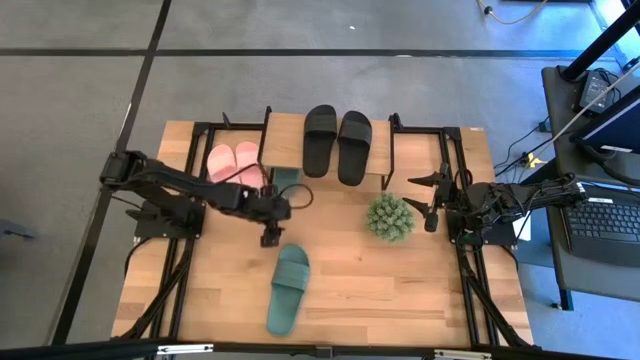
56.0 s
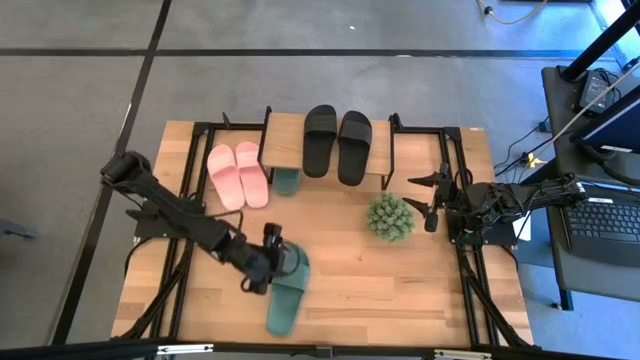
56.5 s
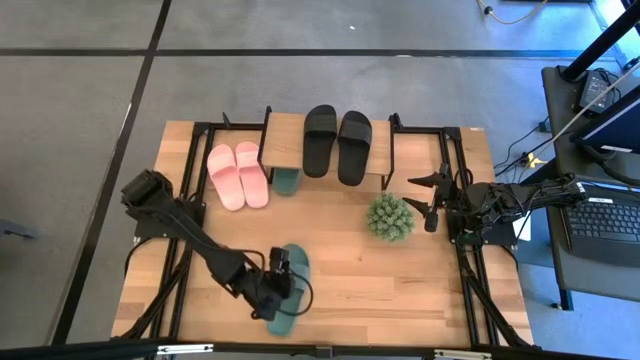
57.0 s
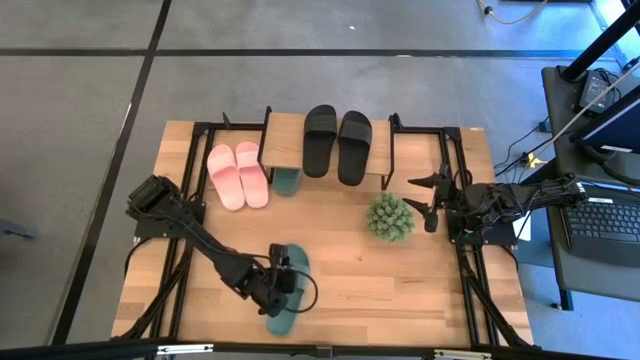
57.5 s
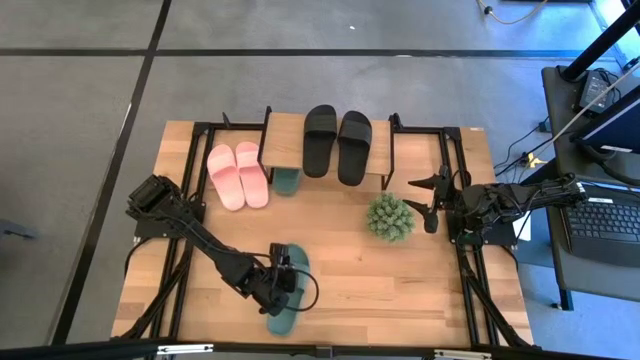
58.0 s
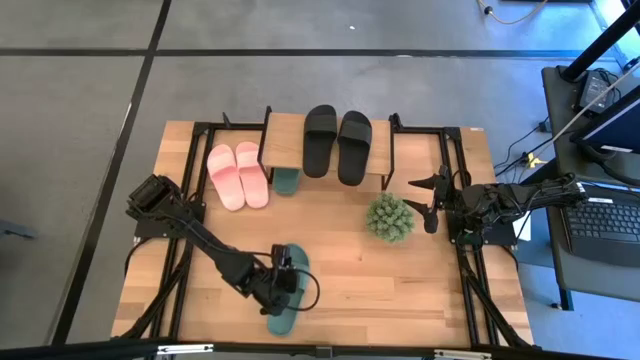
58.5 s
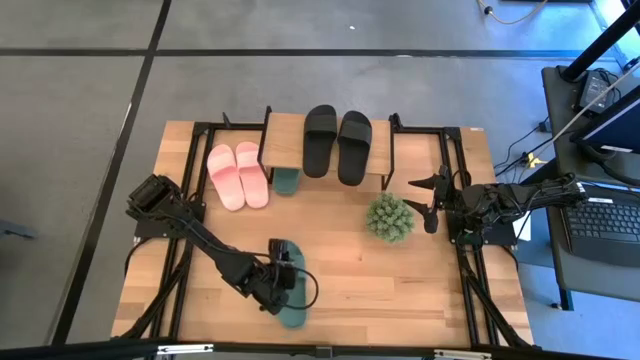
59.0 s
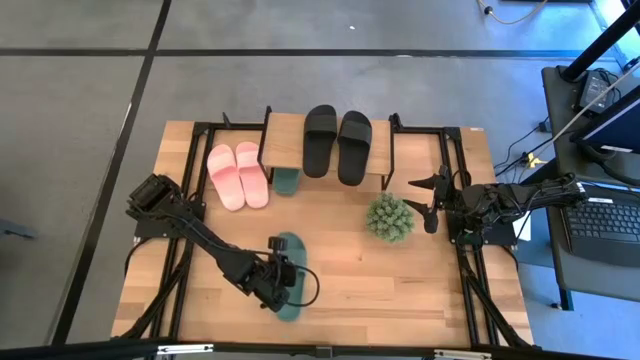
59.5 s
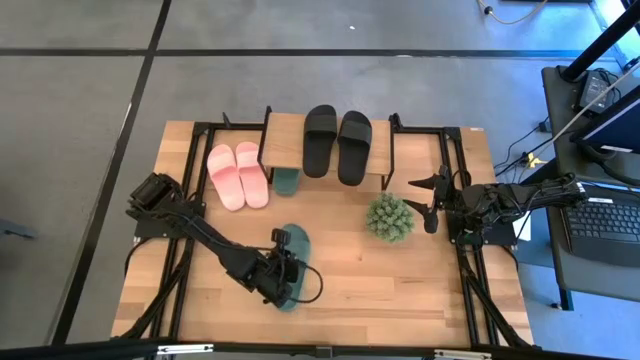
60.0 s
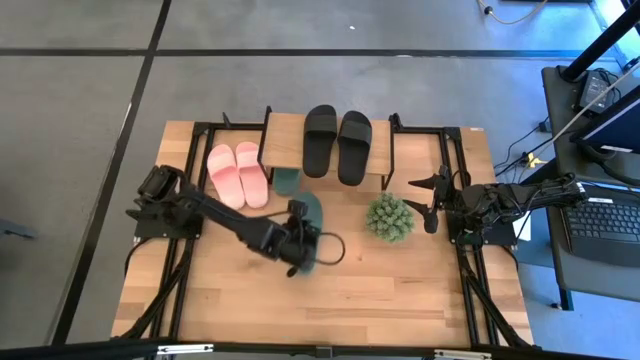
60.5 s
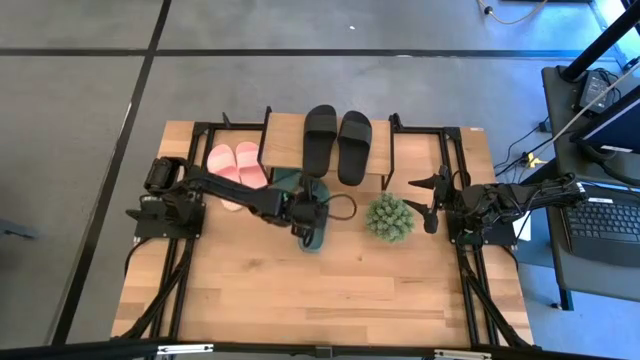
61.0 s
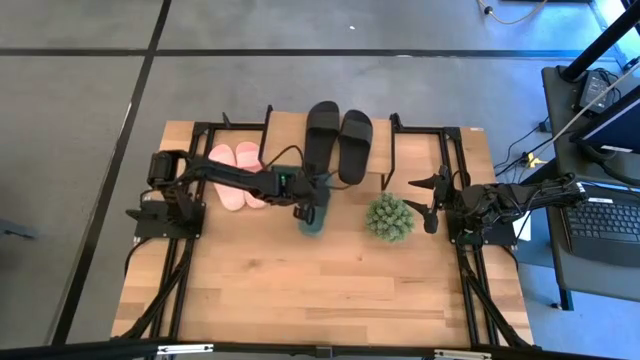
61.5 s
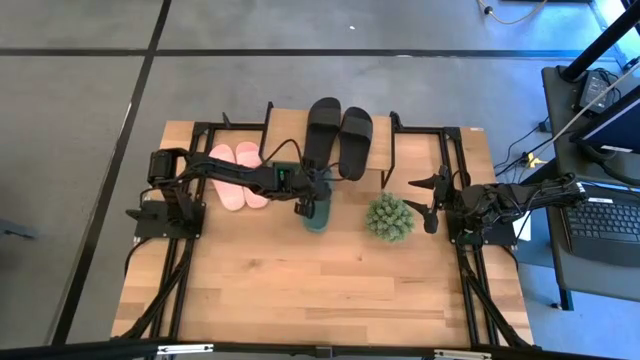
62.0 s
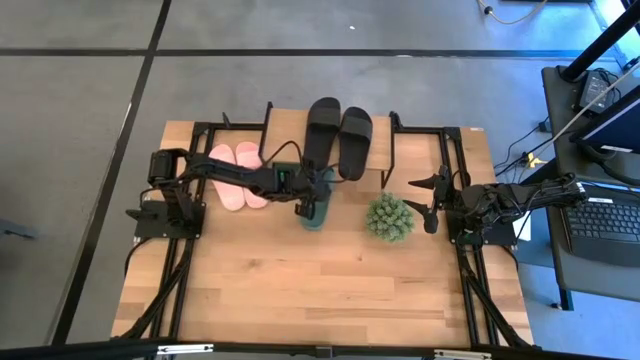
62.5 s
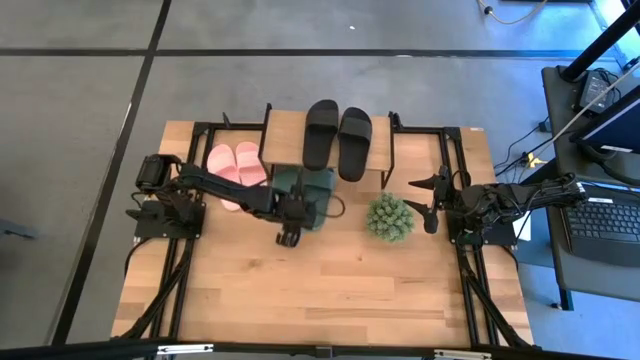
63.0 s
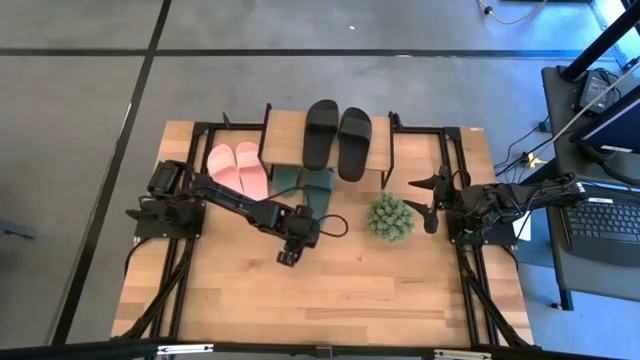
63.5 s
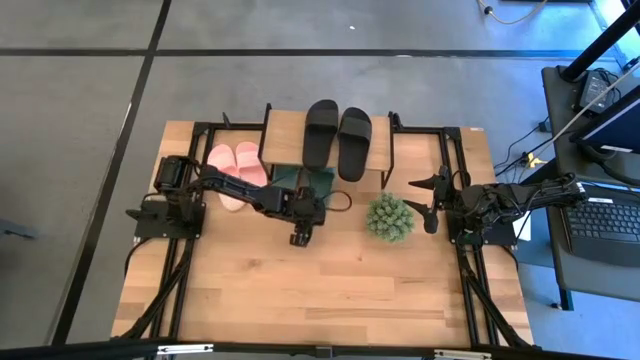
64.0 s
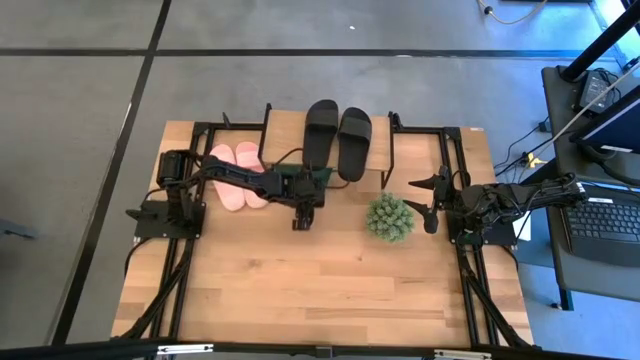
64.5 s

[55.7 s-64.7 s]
Task: Pick and place slides into the shelf
Put the green slide under the shelf

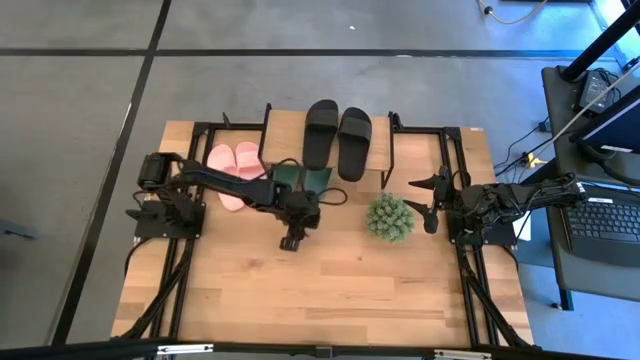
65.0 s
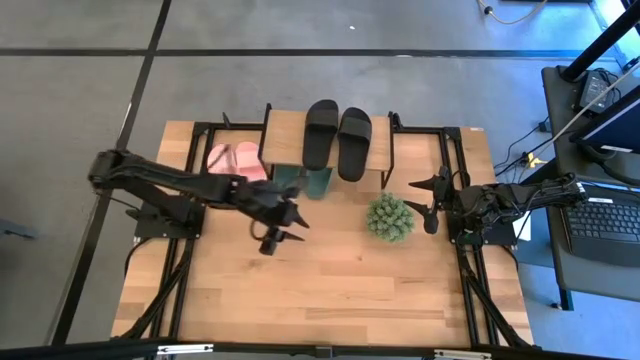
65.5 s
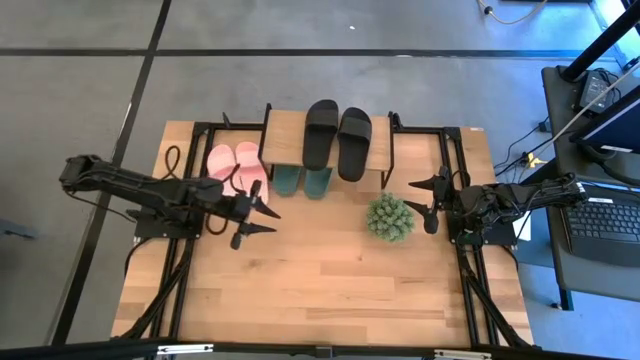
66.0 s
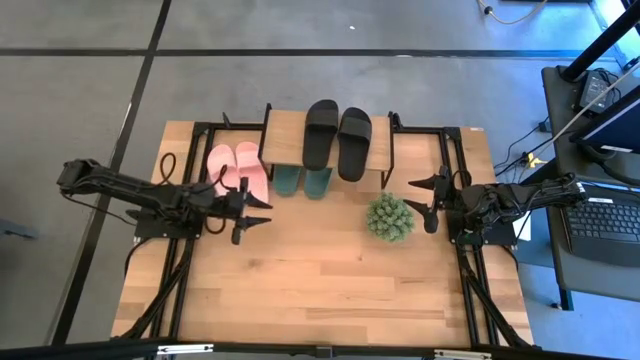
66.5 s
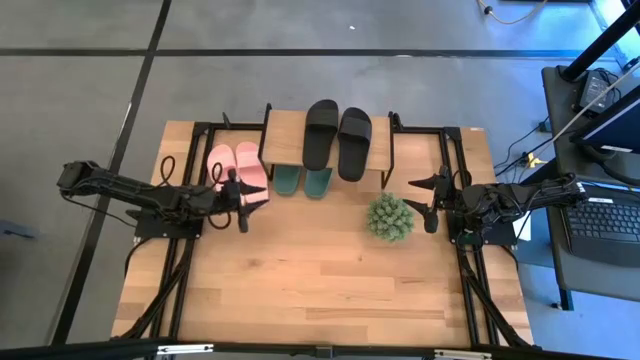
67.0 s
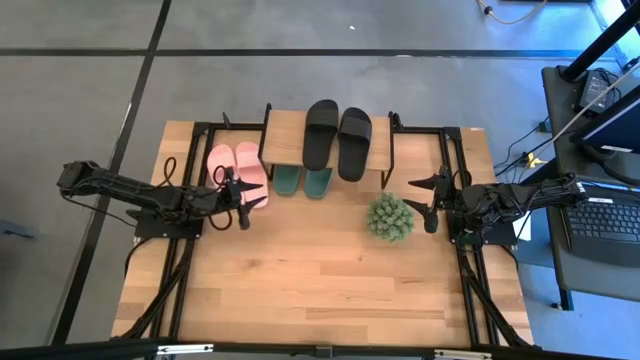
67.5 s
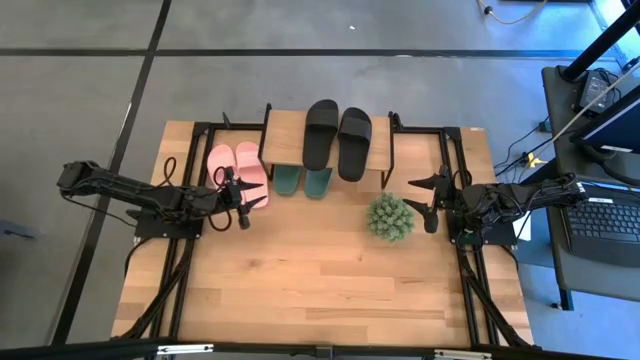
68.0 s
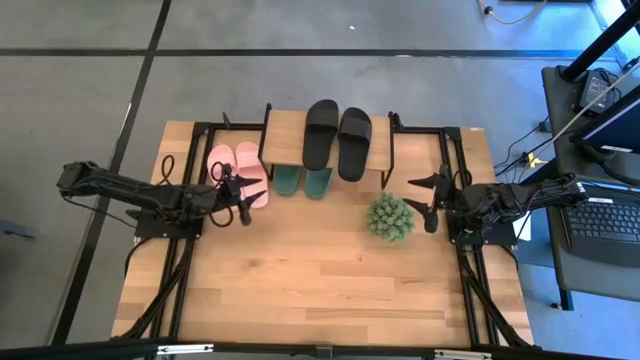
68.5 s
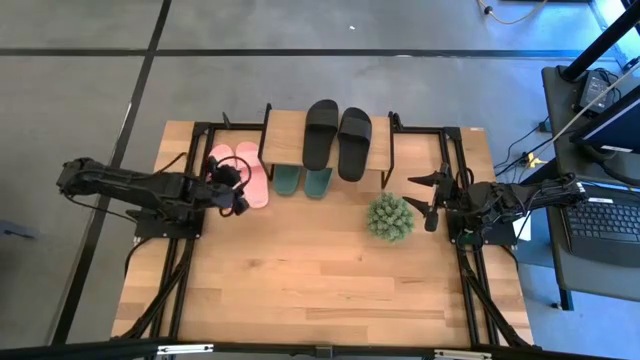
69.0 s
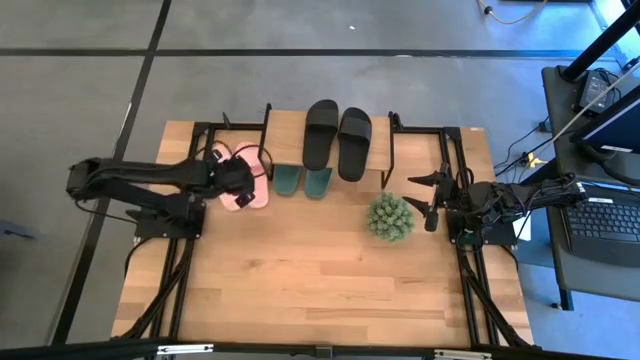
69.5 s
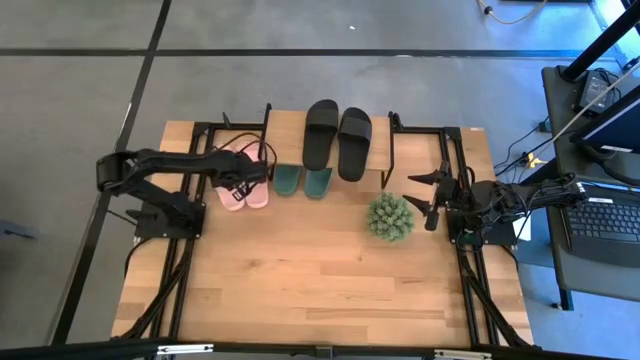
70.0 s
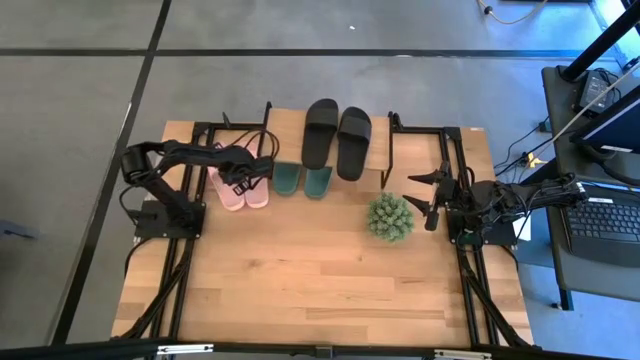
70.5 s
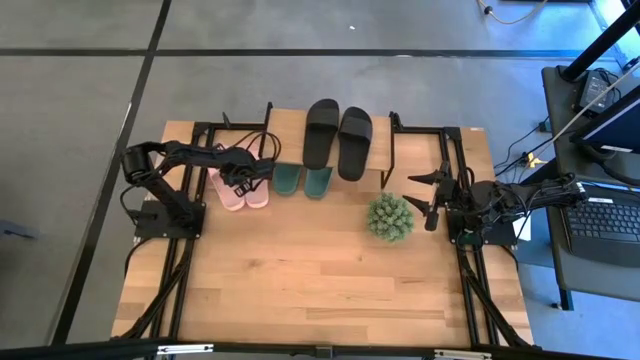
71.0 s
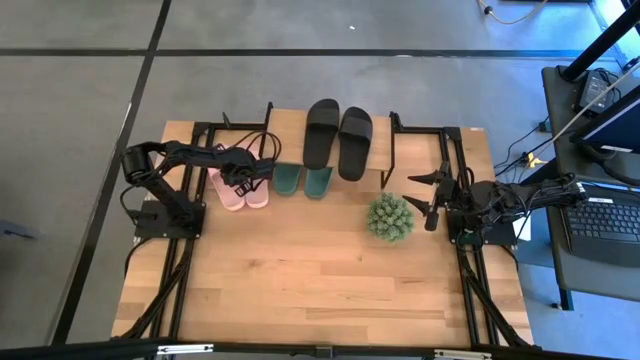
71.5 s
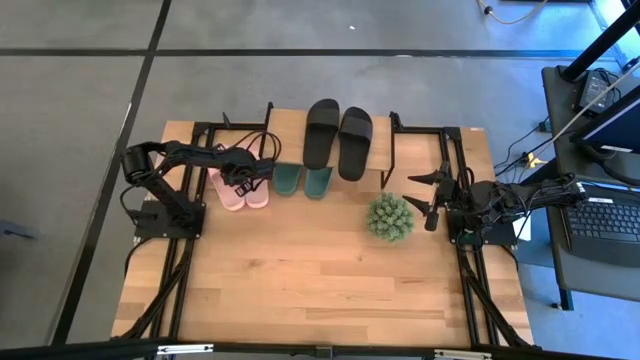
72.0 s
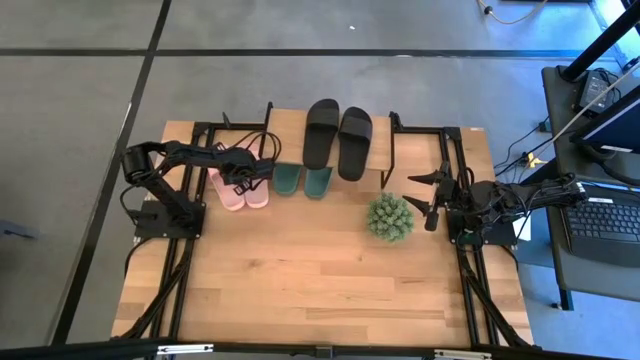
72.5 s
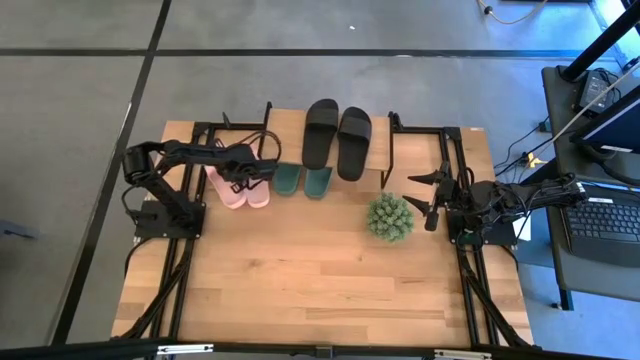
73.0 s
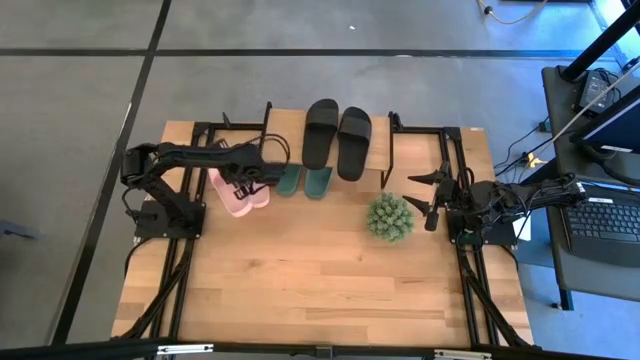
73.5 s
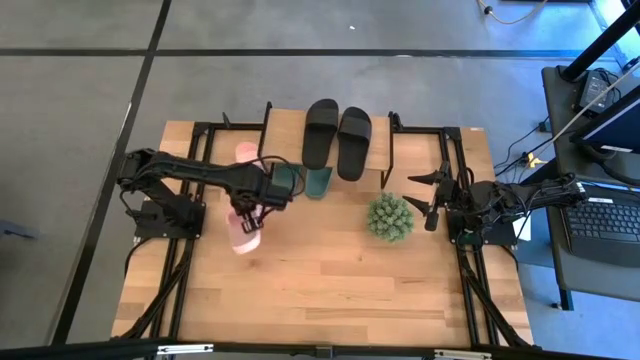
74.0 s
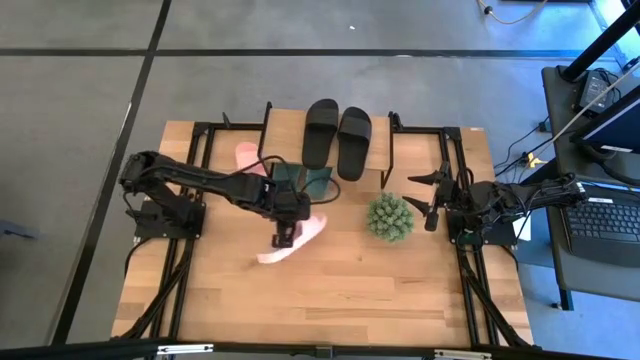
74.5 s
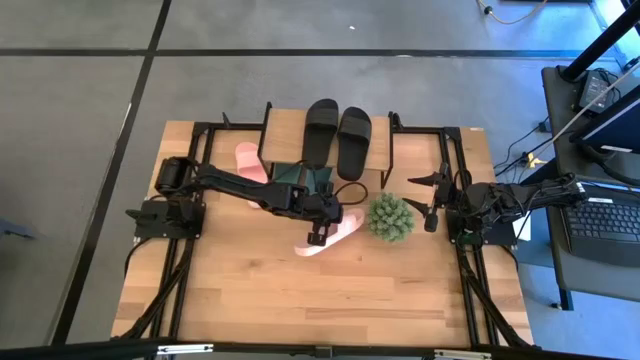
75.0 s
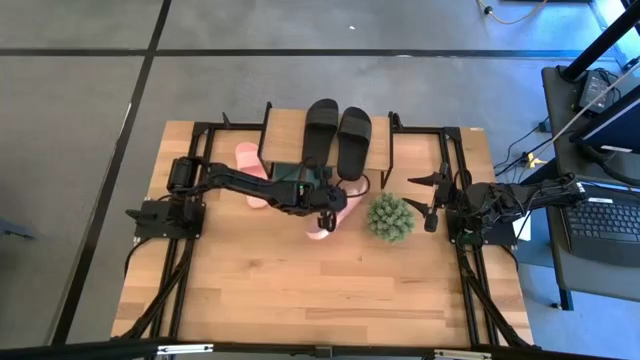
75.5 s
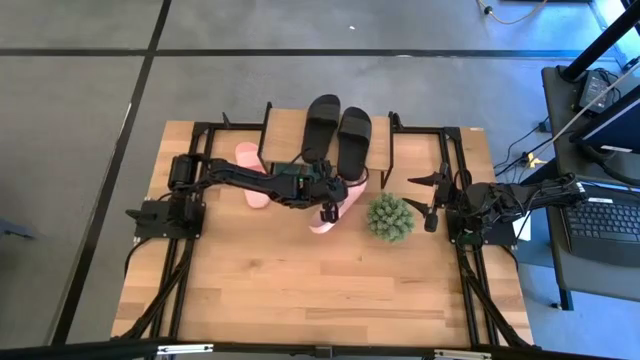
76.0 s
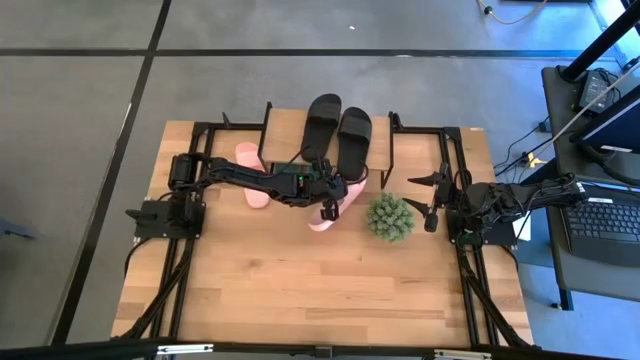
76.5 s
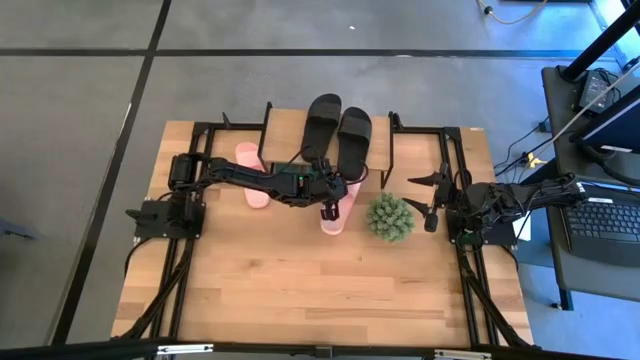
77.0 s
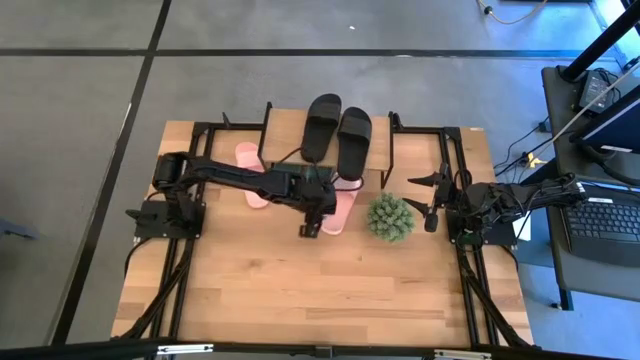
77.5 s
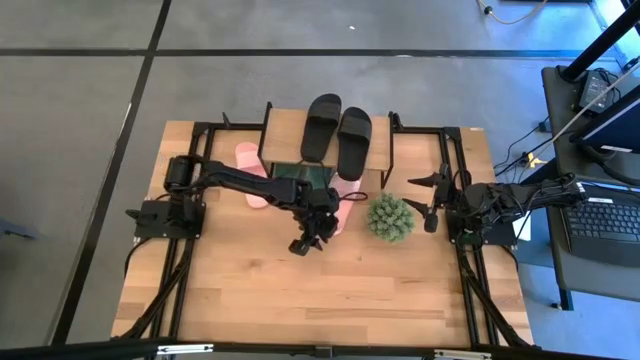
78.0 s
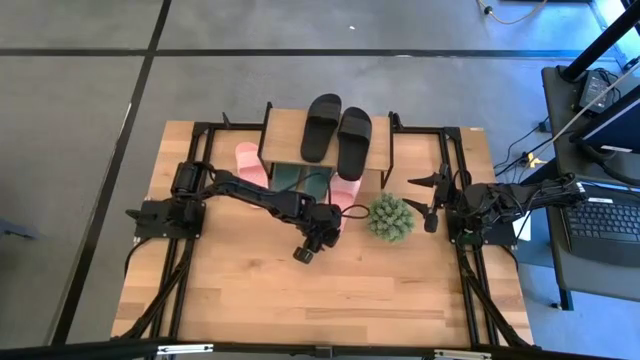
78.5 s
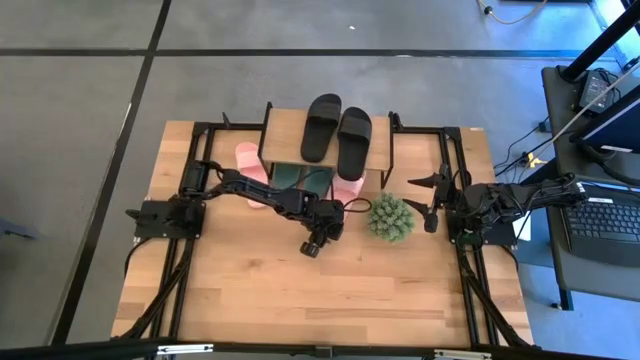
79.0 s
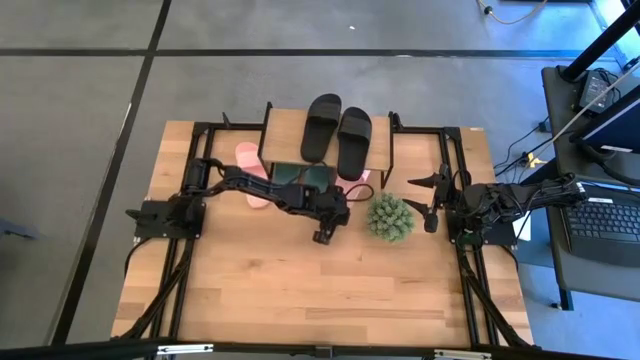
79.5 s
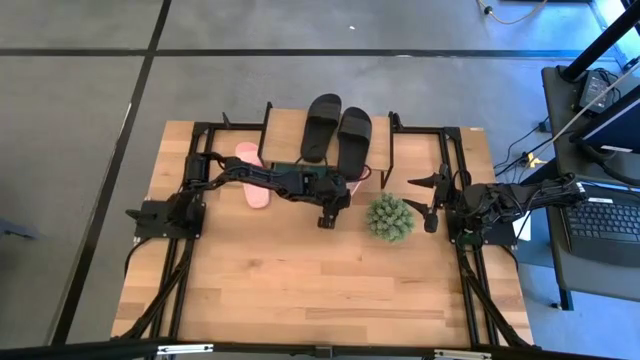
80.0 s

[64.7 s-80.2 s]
Put the left pink slide under the shelf
